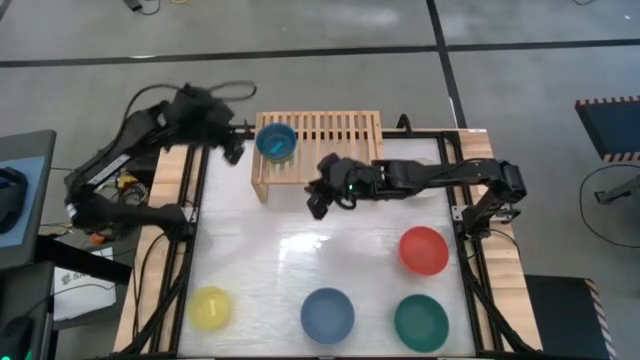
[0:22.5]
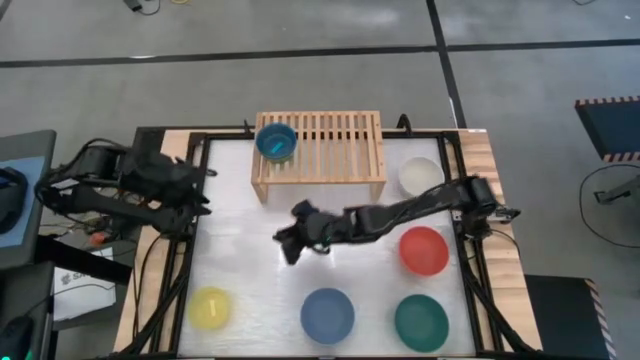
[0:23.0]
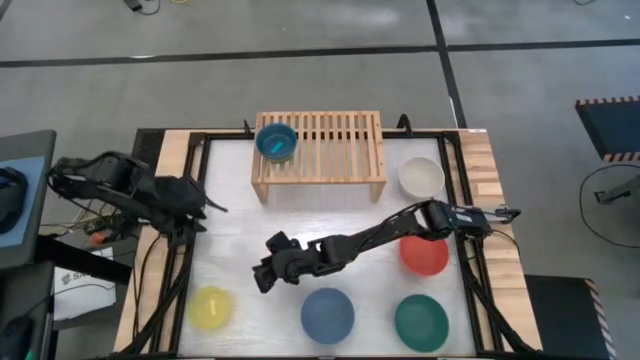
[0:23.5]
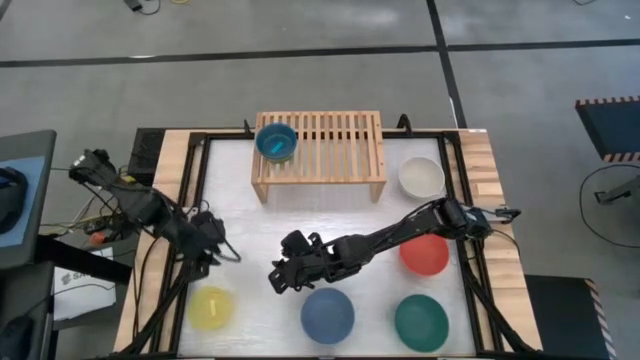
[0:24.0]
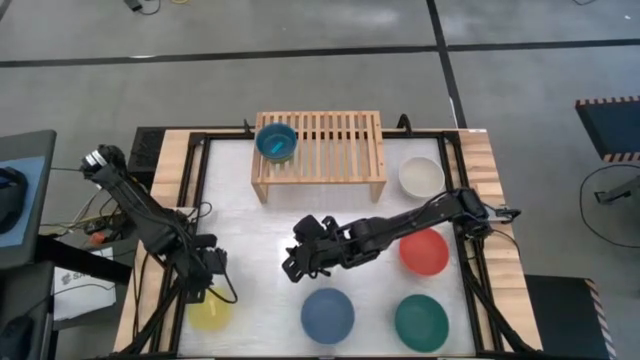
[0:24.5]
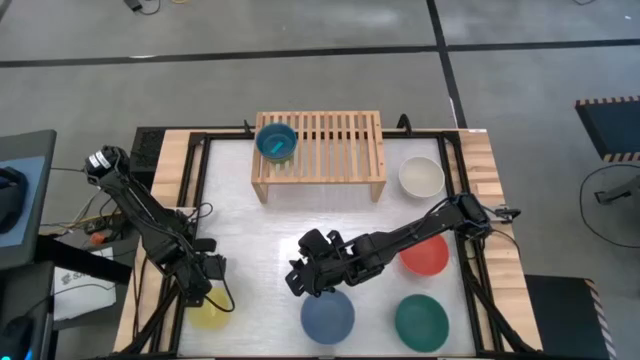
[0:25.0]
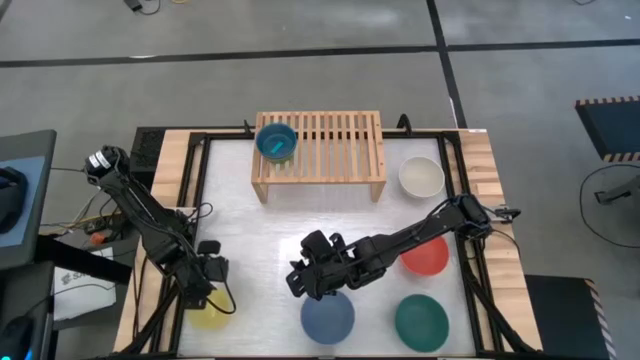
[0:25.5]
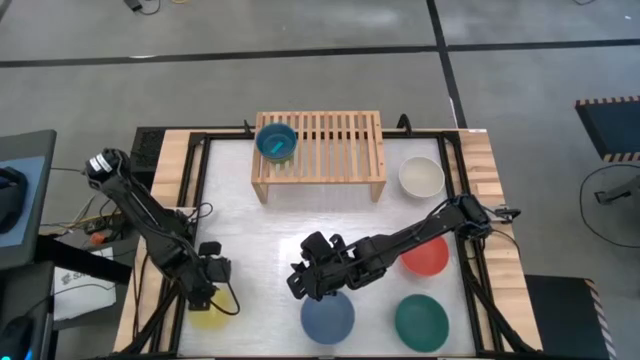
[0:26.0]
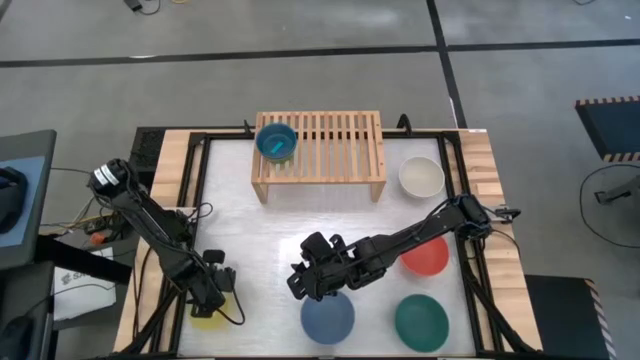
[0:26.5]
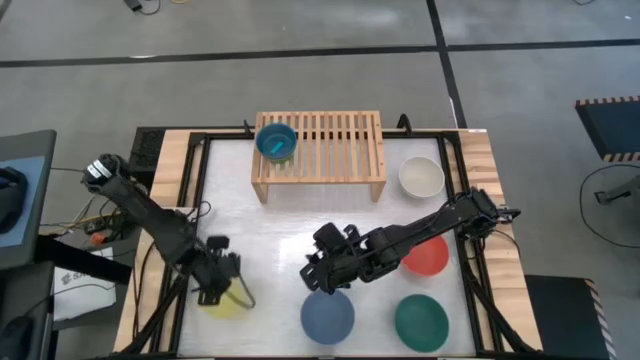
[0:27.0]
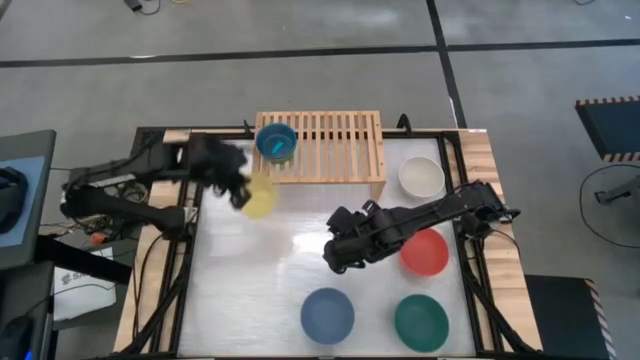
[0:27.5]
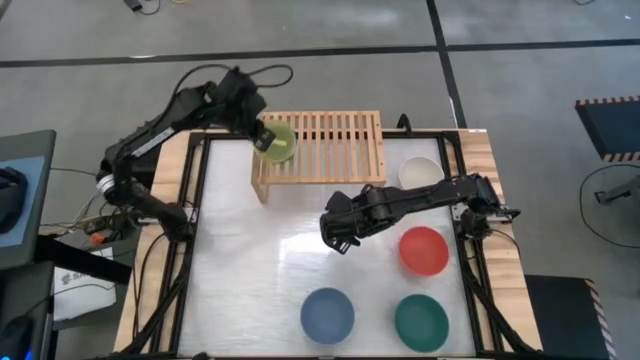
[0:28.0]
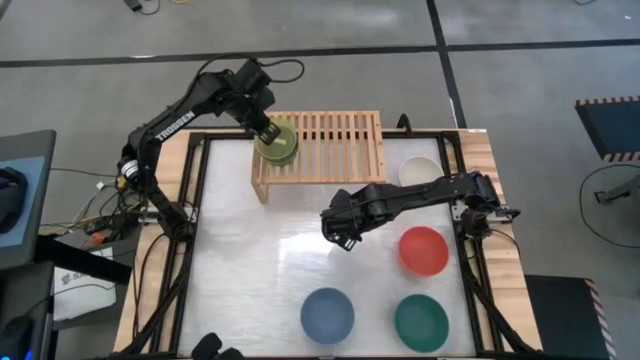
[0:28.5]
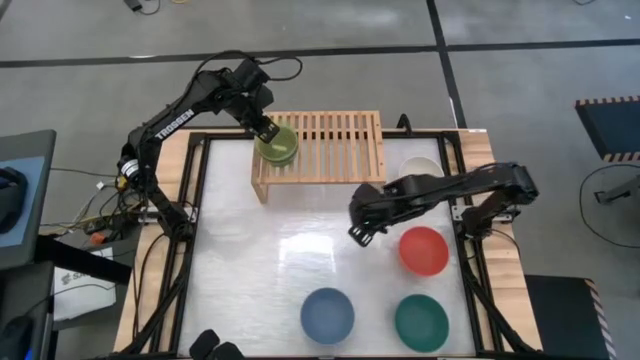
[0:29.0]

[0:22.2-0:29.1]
Task: Place and stack bowls onto a shelf
Stack the transparent yellow bowl on top of the transparent blue bowl

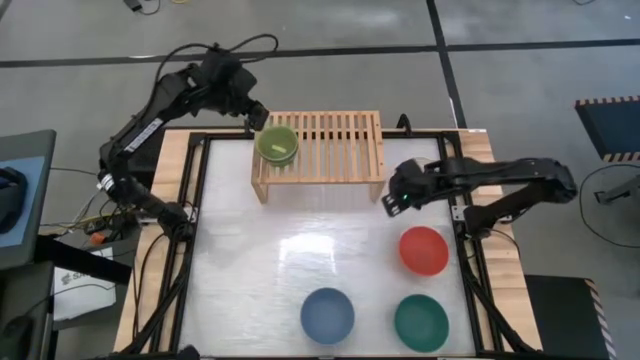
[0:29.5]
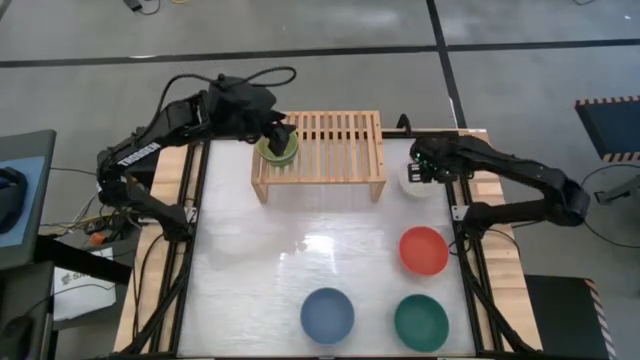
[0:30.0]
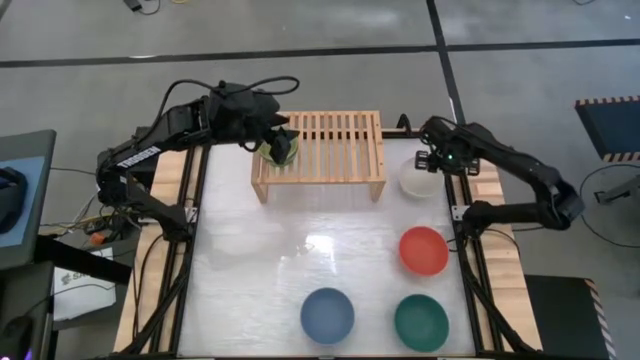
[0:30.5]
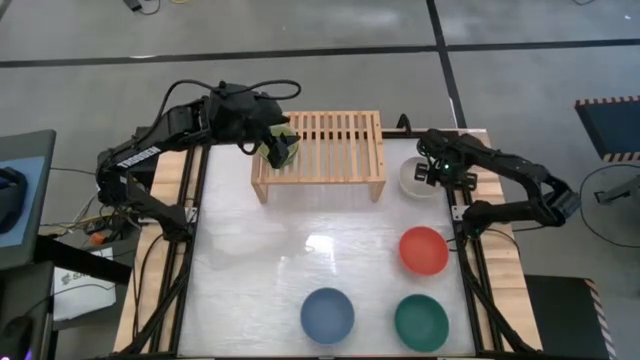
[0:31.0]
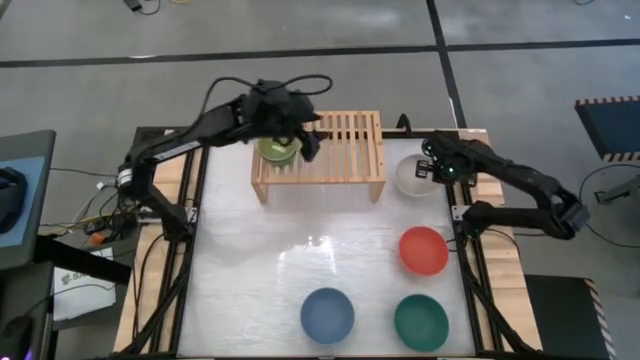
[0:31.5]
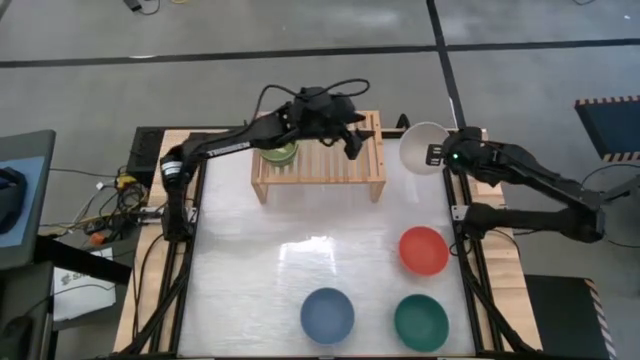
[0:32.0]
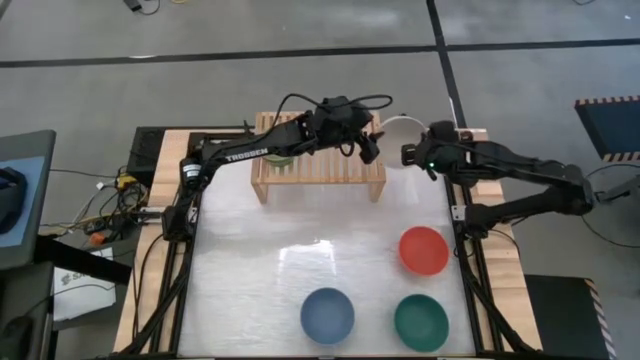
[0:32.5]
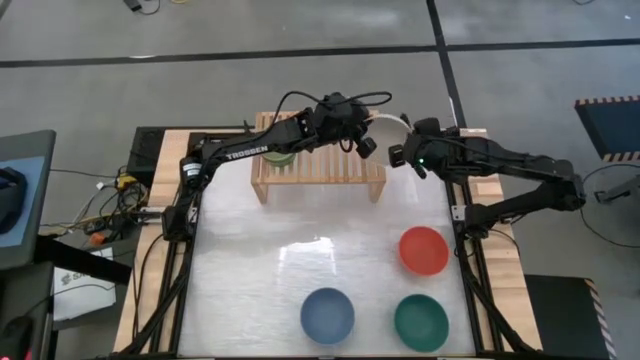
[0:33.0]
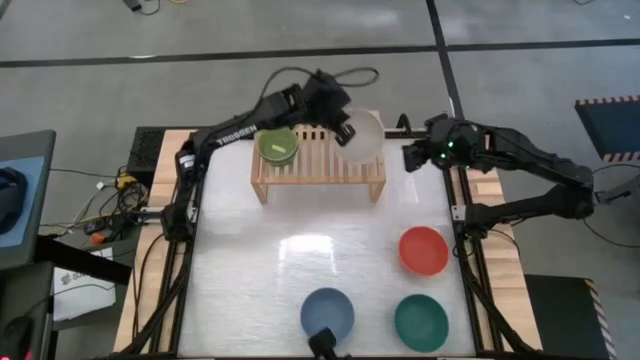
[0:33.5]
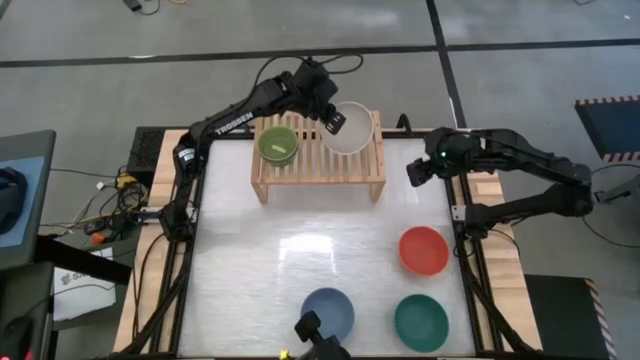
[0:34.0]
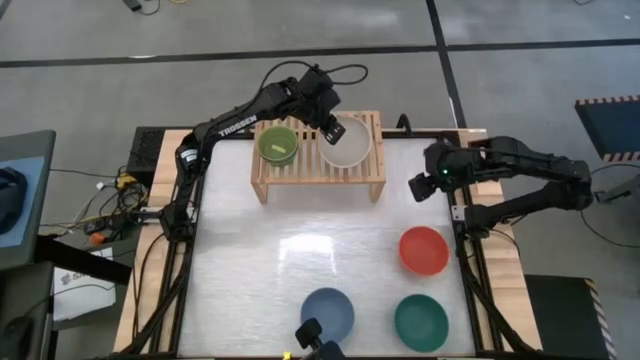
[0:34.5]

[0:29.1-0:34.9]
Put the white bowl on the shelf

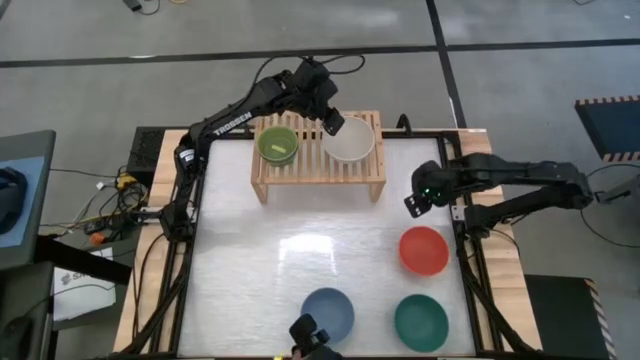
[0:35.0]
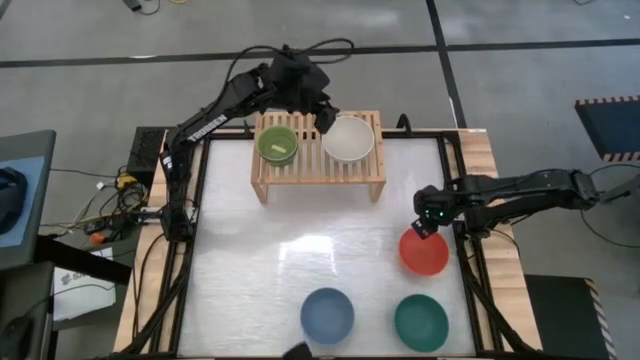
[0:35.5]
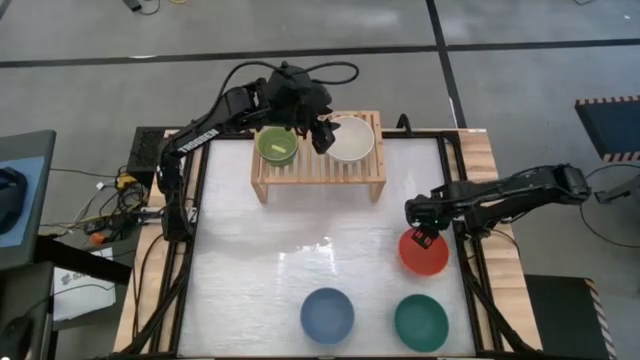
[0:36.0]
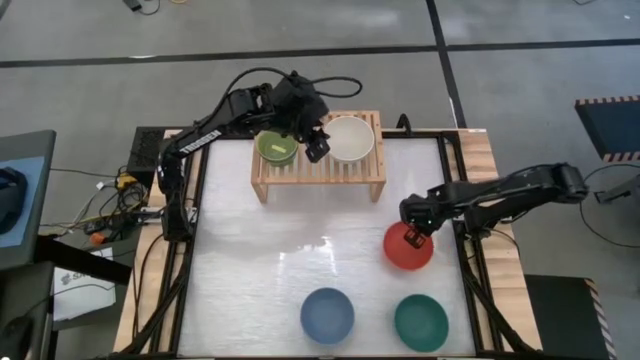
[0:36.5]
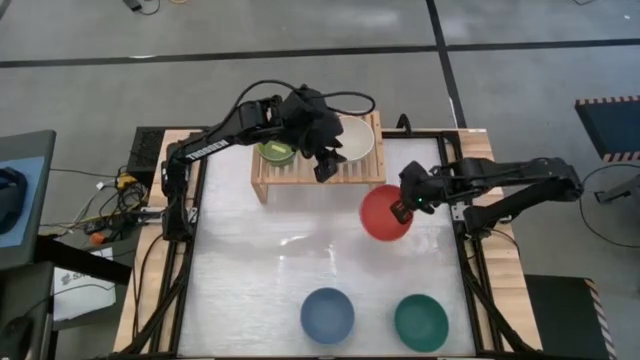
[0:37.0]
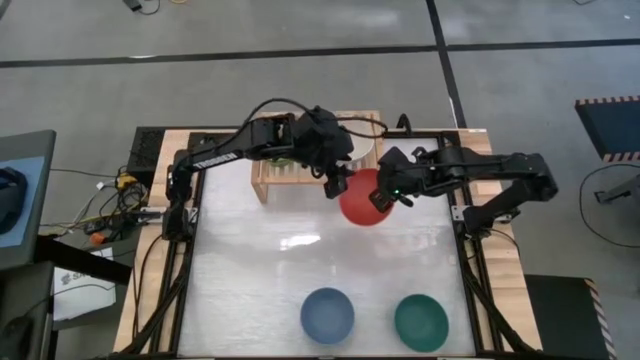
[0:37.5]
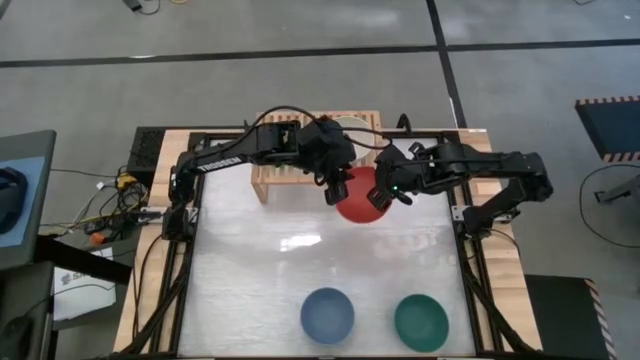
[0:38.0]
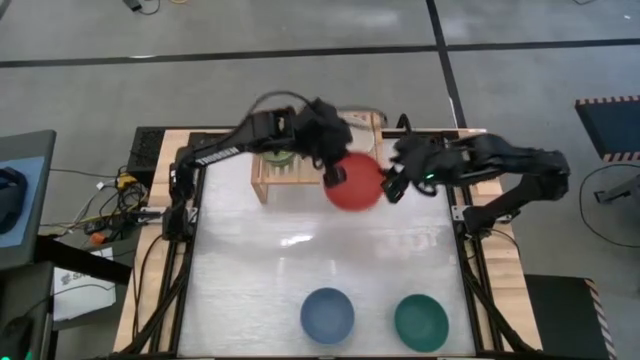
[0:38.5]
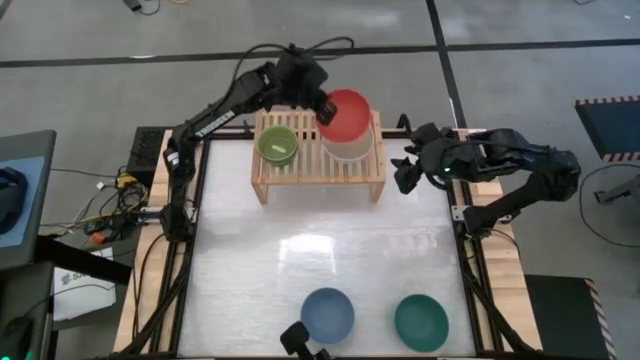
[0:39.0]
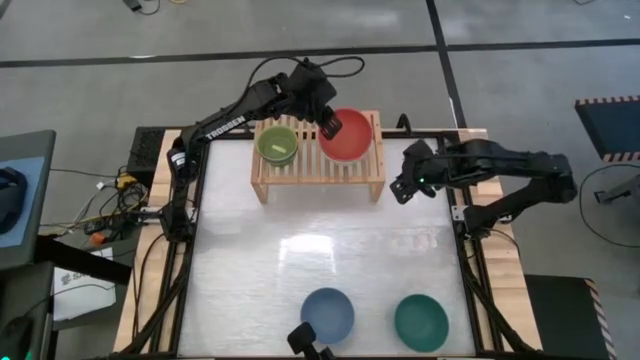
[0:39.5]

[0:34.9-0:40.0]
Stack the orange bowl on top of the white bowl

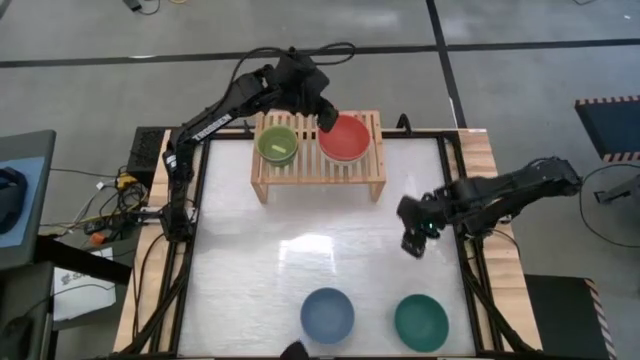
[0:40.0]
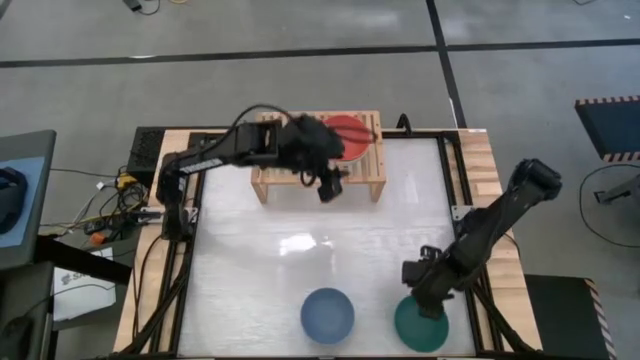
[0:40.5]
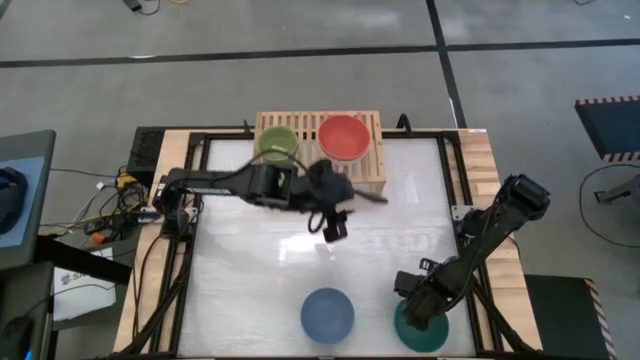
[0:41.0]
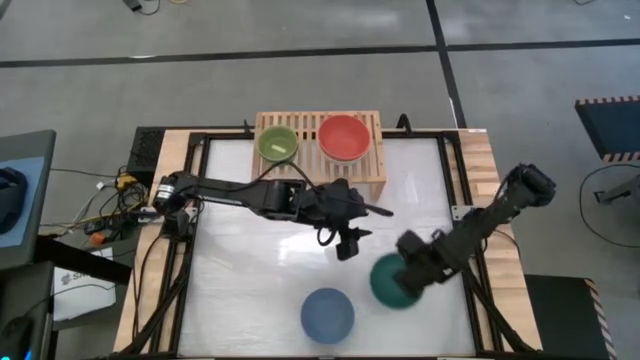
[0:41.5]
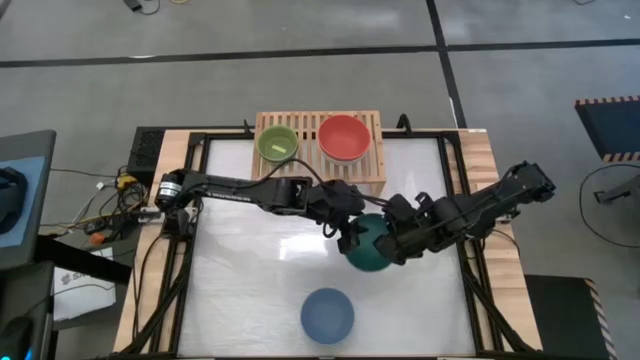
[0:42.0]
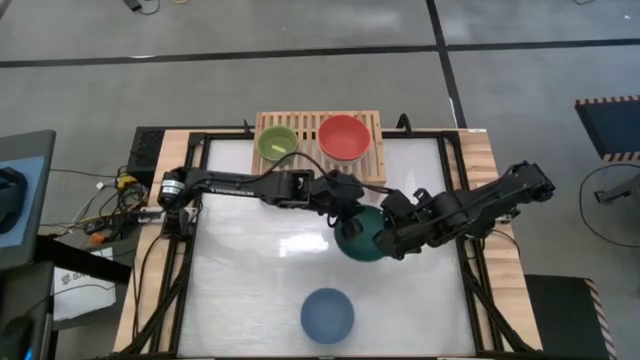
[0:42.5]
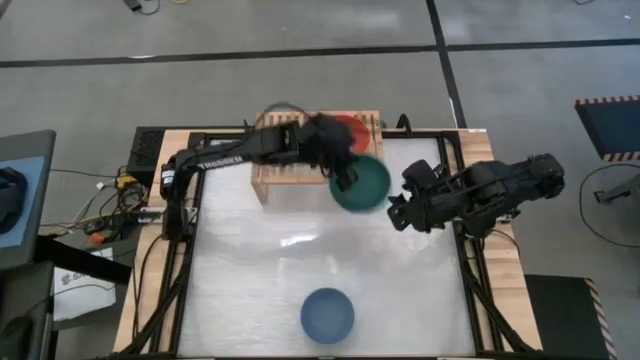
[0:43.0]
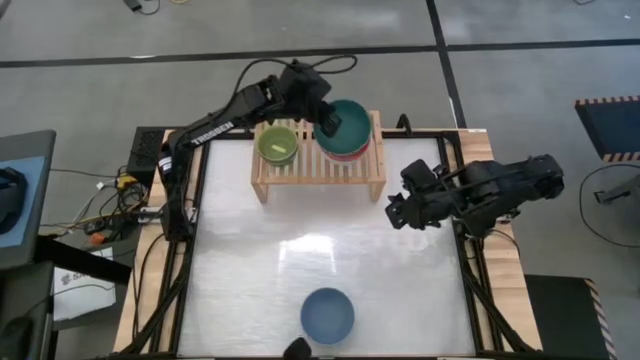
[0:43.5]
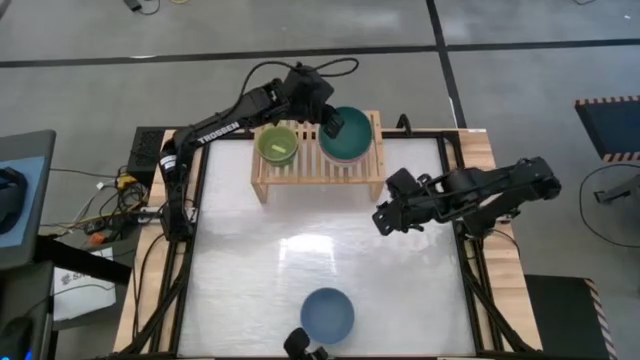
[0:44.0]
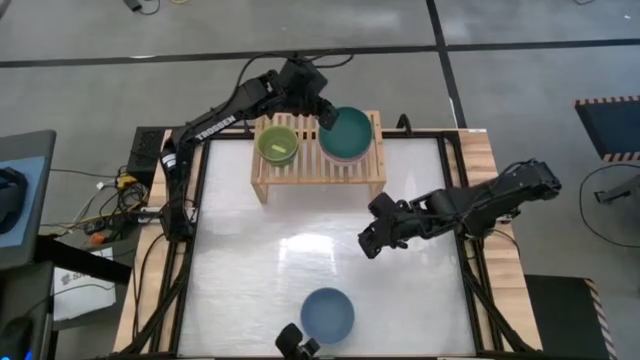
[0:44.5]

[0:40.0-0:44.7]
Stack the green bowl on top of the orange bowl
